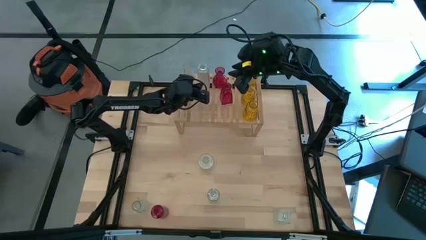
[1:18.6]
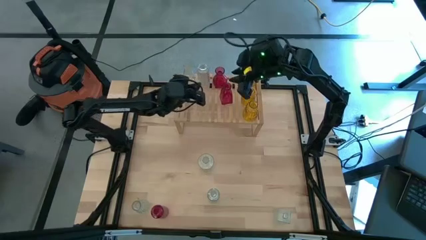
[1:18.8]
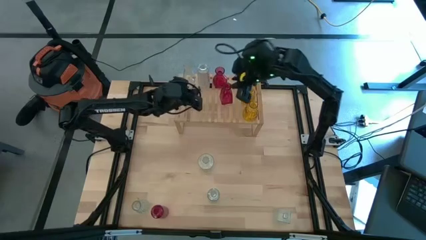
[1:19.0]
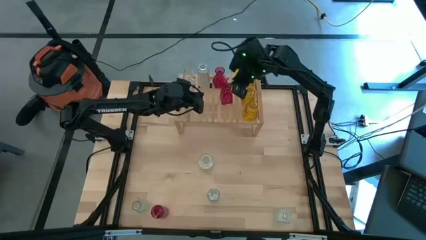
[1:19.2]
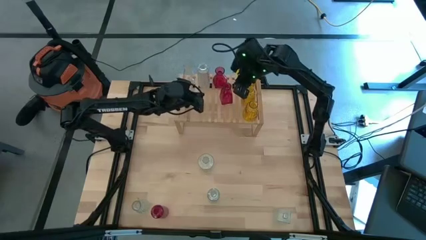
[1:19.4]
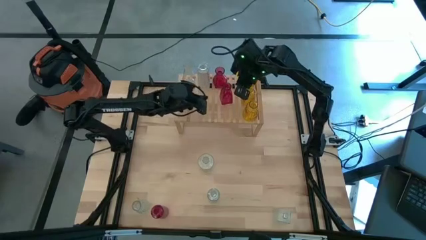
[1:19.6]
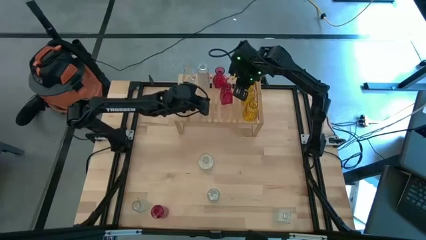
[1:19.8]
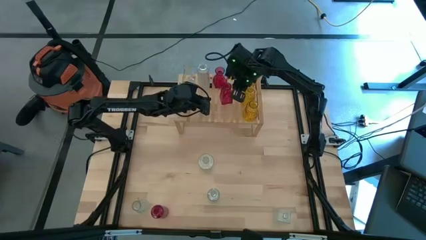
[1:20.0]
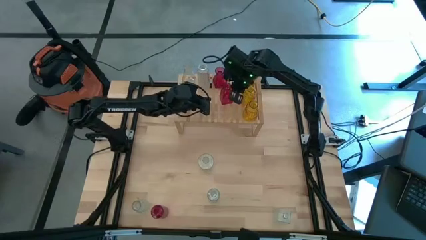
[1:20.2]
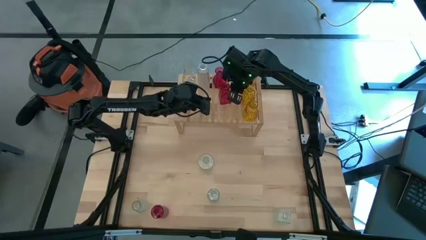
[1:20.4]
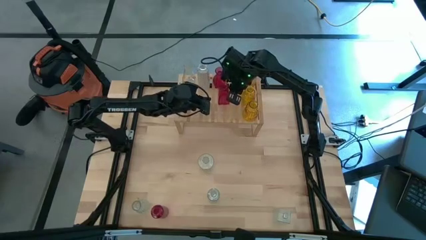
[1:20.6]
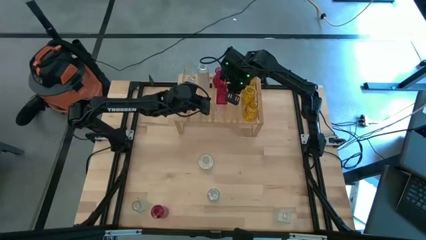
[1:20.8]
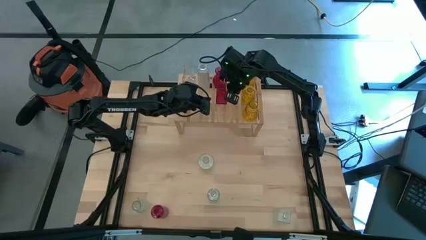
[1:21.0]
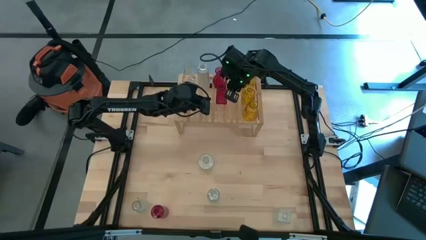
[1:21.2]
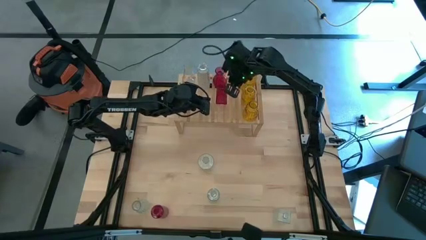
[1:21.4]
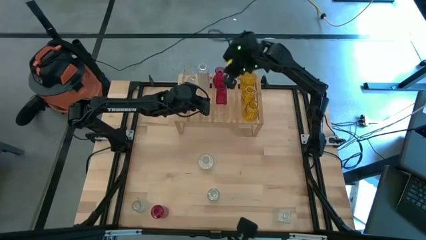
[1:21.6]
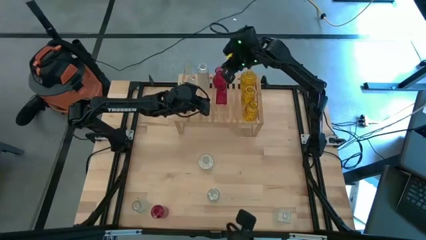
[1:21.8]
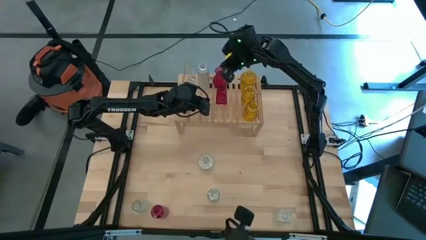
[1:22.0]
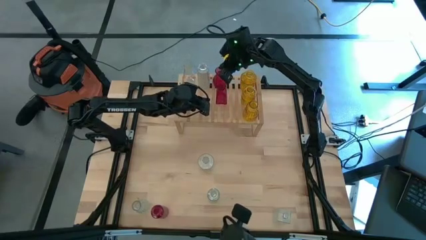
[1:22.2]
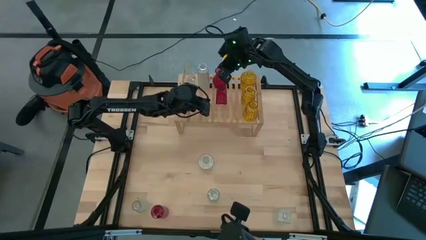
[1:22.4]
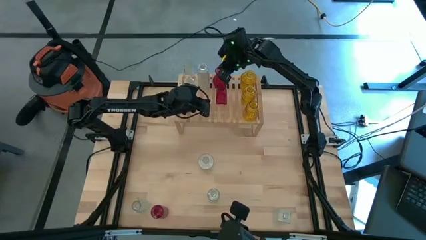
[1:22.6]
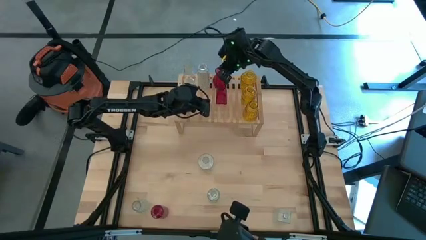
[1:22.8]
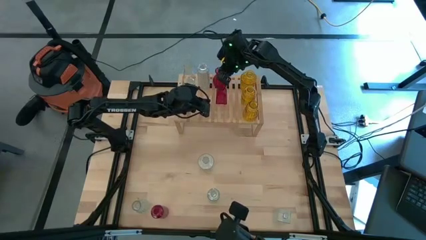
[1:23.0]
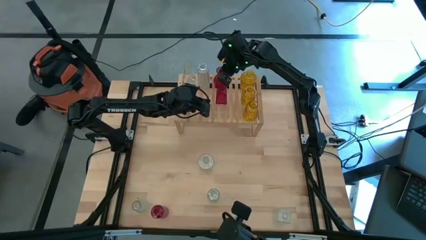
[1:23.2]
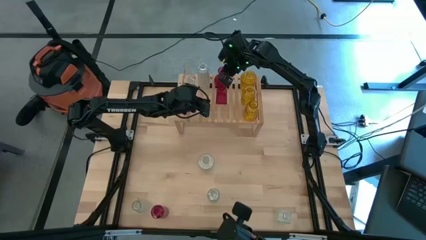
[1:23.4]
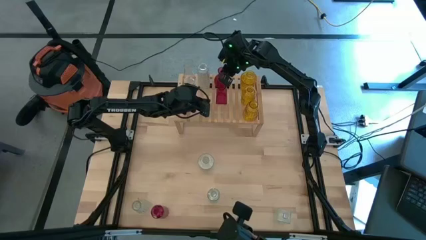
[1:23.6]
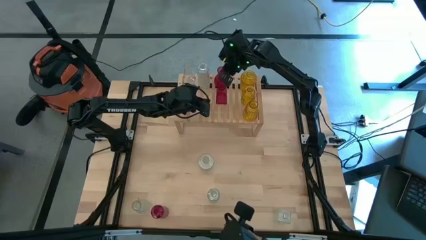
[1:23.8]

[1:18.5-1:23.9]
Task: sort vases onto shelf
Adjust the red vases on the shelf

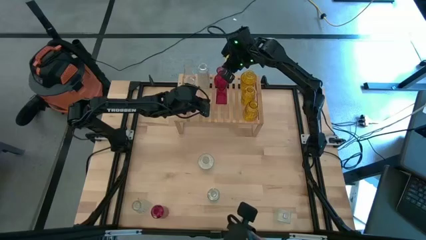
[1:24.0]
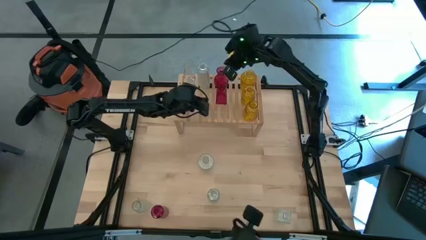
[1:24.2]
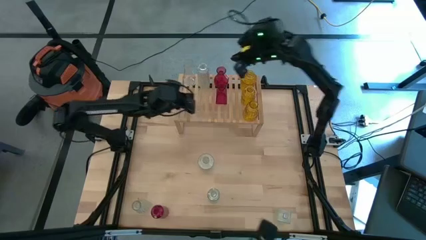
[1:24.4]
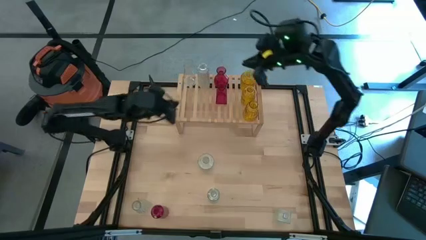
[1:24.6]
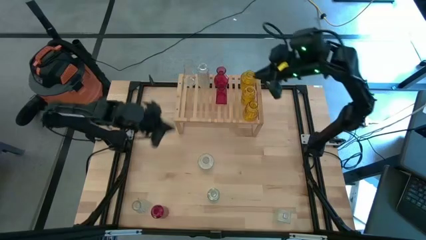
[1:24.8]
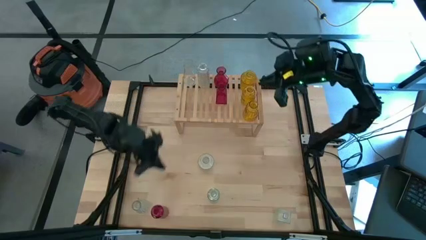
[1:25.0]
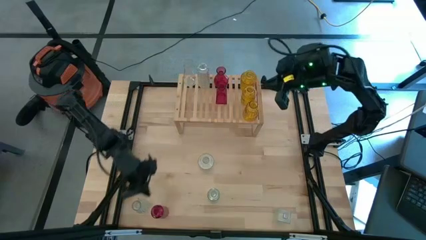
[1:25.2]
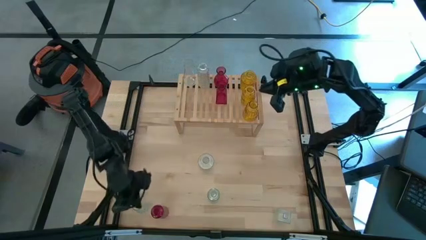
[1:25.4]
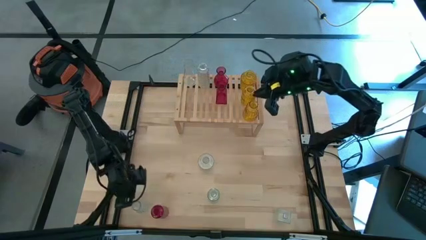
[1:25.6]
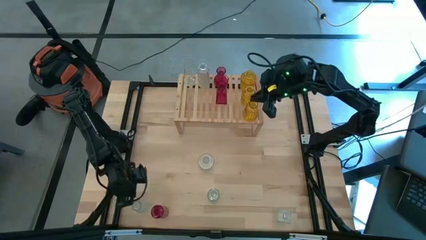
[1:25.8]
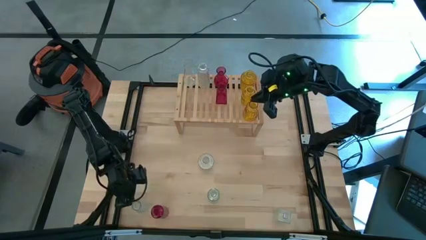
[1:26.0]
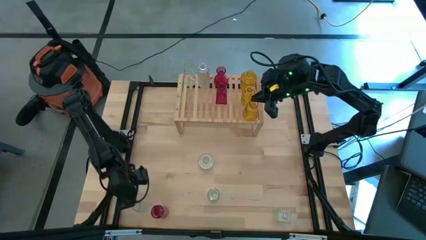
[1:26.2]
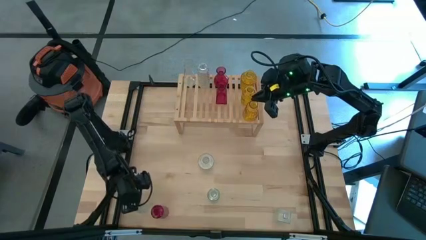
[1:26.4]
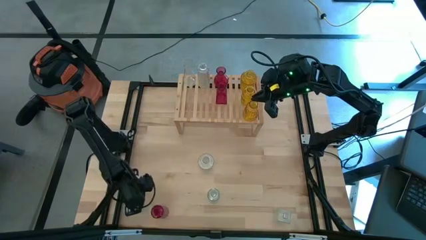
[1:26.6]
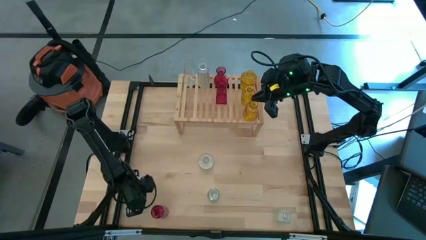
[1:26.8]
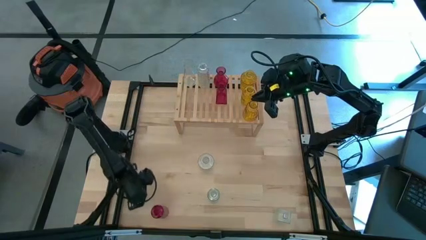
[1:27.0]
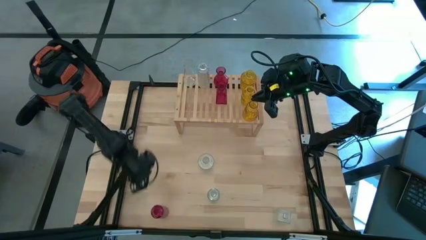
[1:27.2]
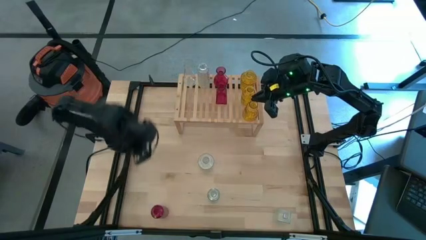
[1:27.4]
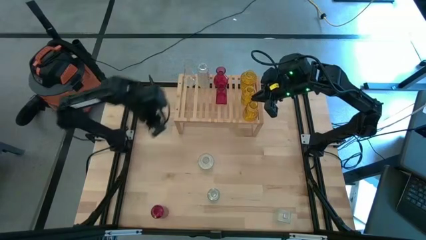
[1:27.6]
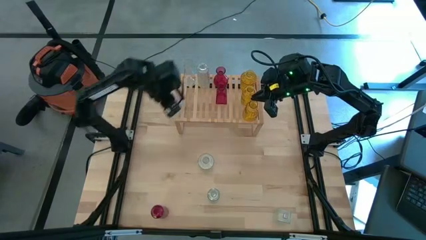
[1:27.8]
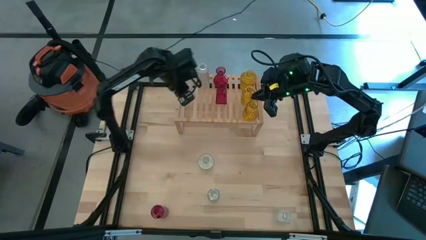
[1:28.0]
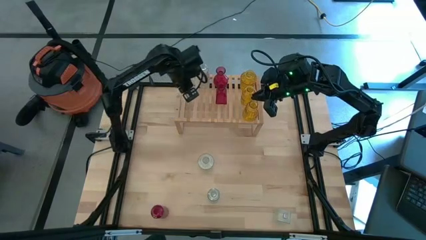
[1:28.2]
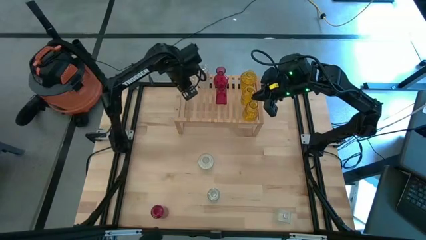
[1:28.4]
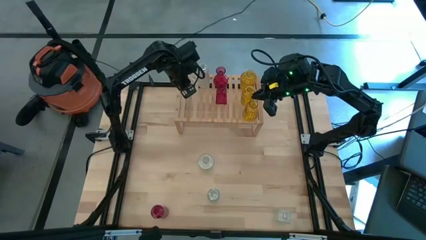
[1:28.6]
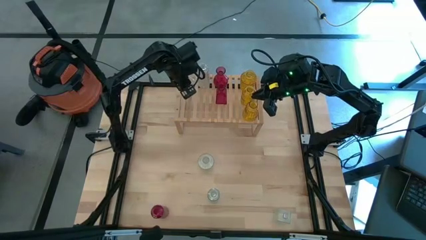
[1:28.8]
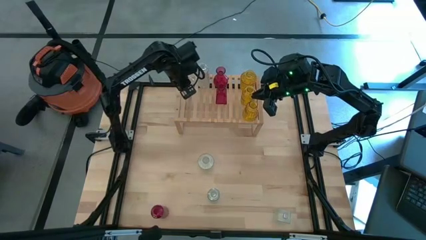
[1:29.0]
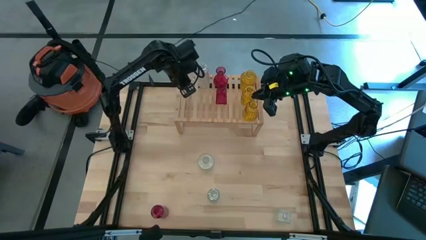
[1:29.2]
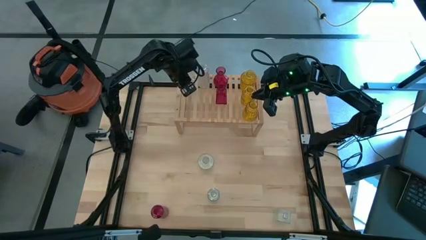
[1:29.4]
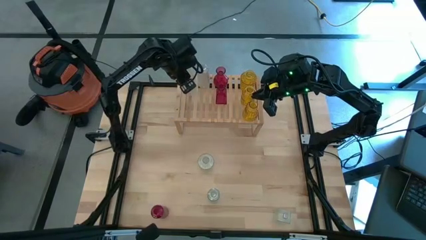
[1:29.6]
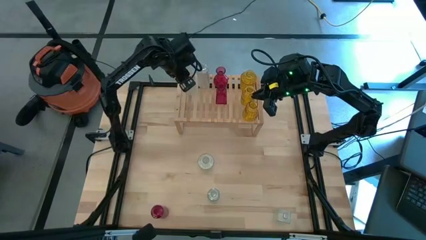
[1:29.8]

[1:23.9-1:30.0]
Put the transparent vase on the shelf aligned with the other transparent vase

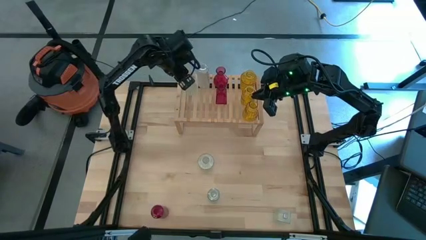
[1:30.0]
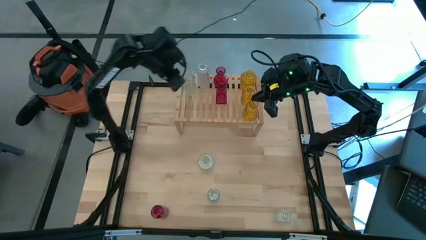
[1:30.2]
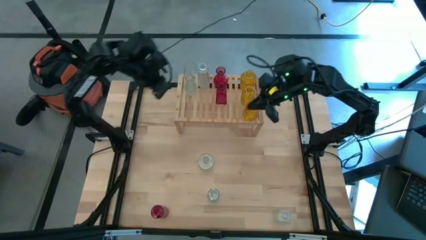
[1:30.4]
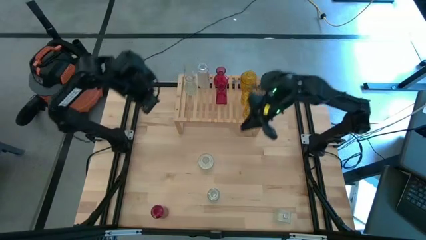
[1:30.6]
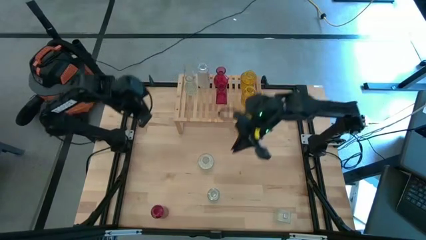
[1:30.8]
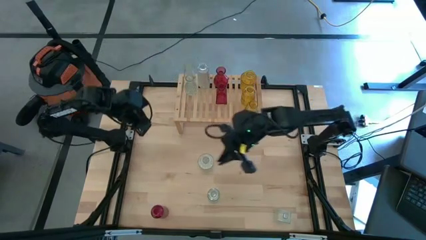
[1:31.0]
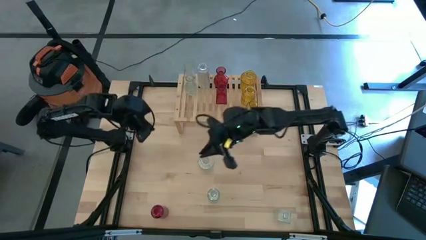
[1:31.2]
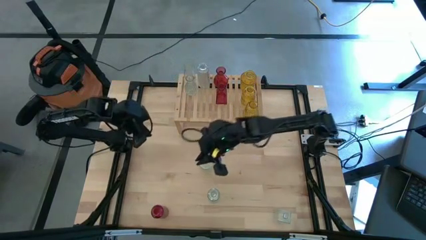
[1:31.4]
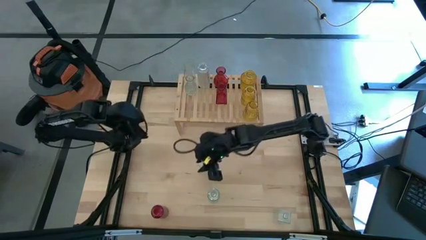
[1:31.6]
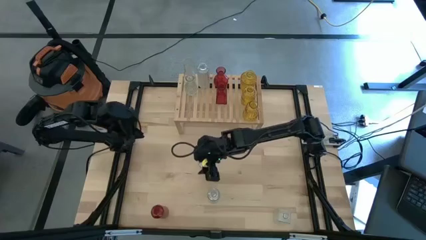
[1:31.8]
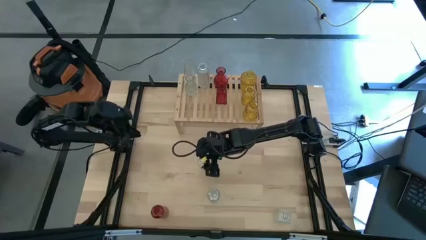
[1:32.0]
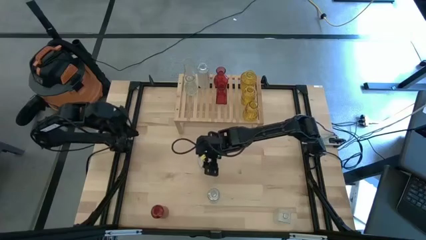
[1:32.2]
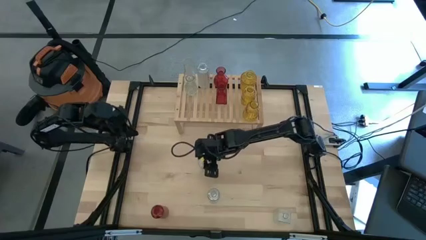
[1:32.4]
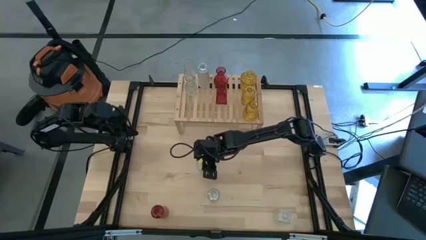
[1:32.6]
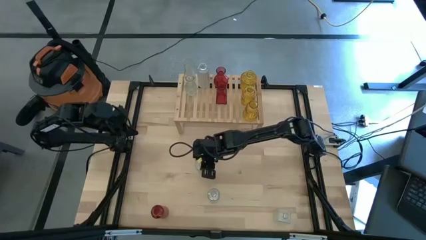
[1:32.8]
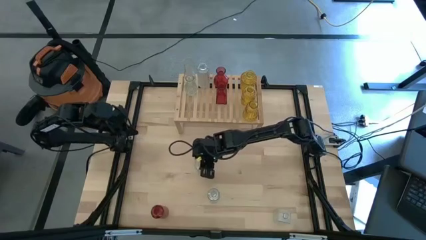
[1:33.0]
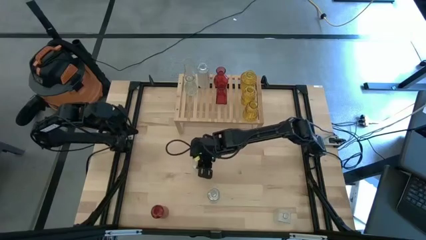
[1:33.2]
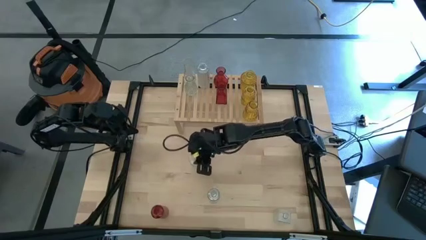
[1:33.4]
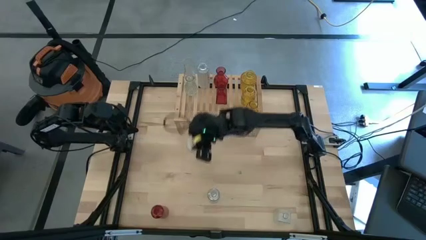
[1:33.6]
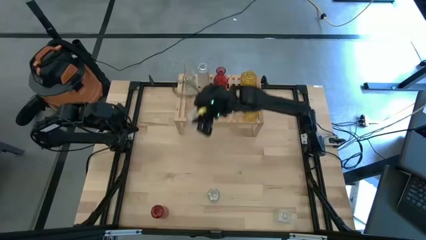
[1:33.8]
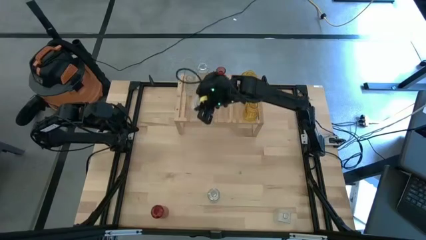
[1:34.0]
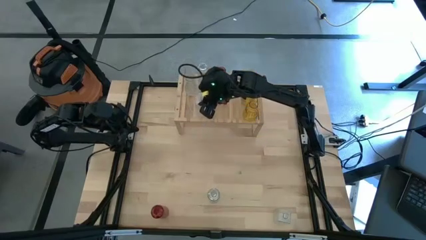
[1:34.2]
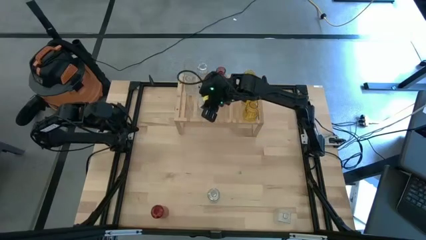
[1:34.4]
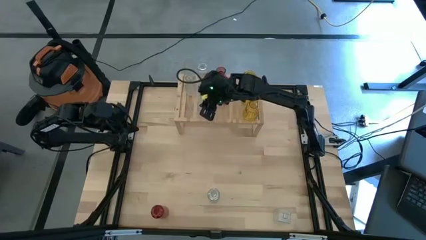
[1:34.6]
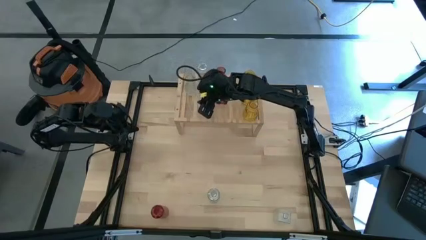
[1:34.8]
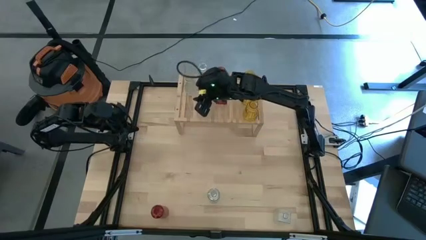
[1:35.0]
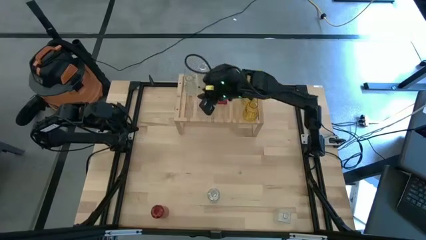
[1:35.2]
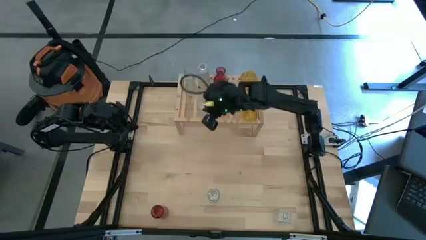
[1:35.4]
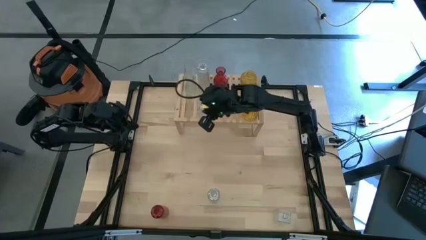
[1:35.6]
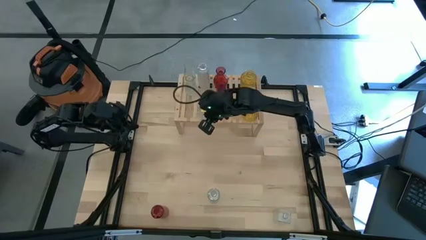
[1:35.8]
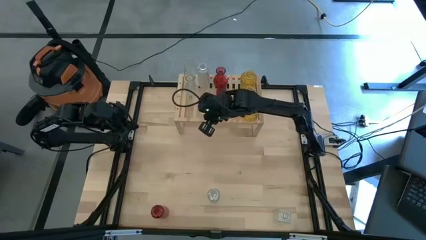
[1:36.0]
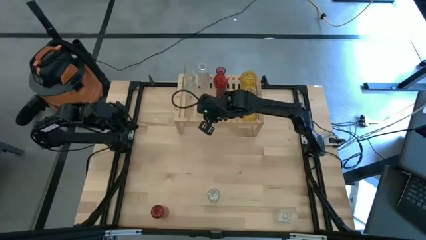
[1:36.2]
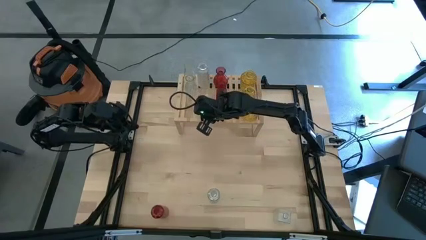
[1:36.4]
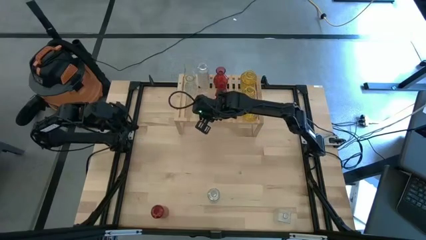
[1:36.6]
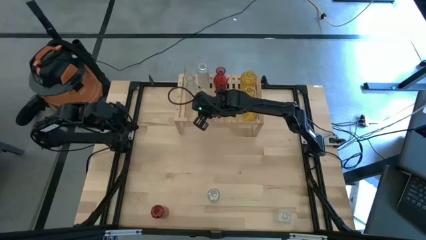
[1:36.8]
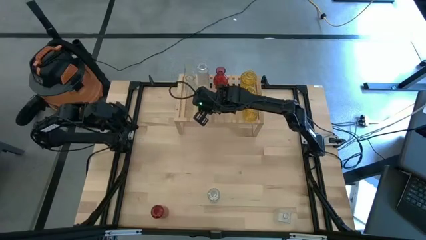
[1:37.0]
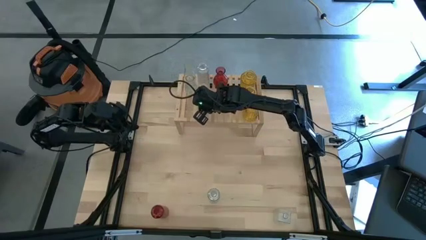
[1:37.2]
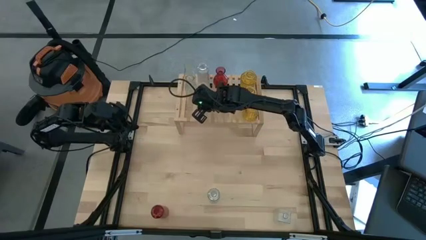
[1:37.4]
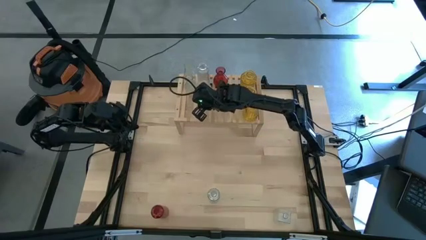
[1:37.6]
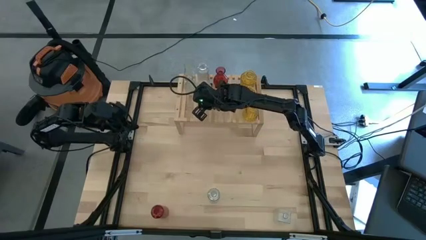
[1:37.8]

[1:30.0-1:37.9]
Put the transparent vase on the shelf aligned with the other transparent vase
